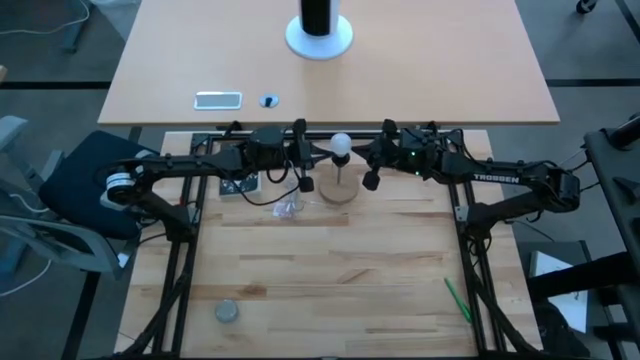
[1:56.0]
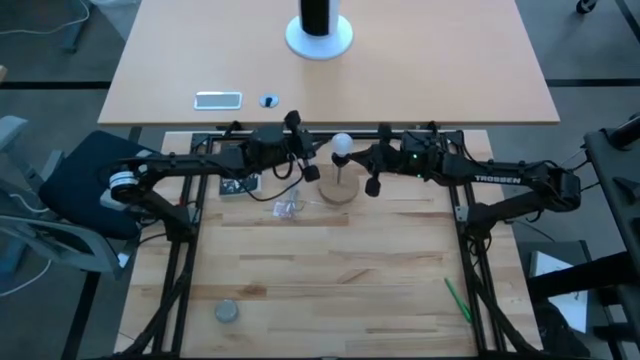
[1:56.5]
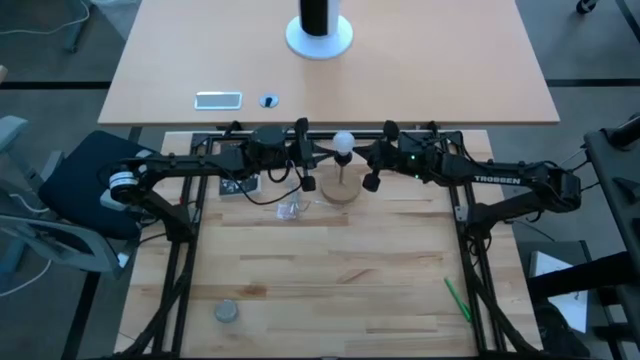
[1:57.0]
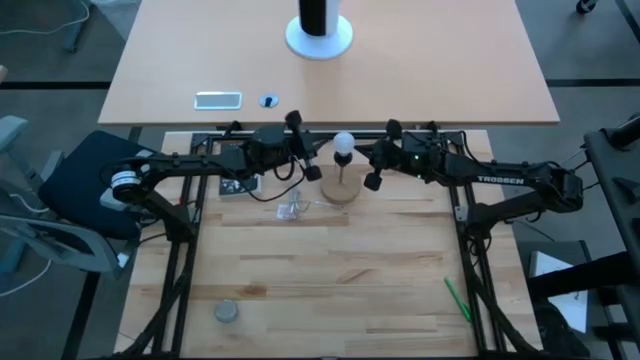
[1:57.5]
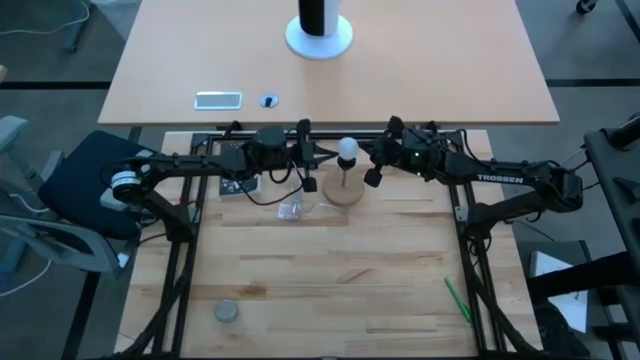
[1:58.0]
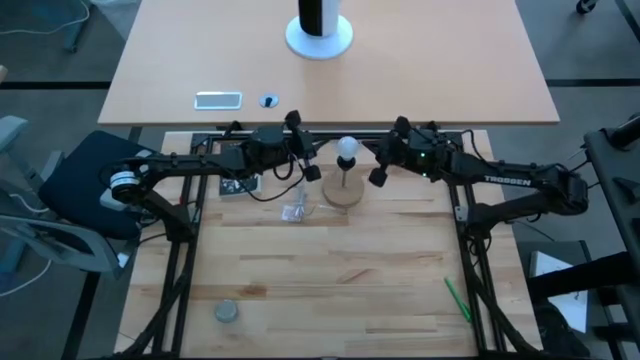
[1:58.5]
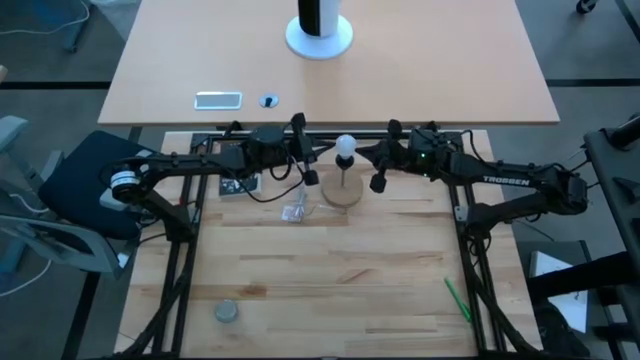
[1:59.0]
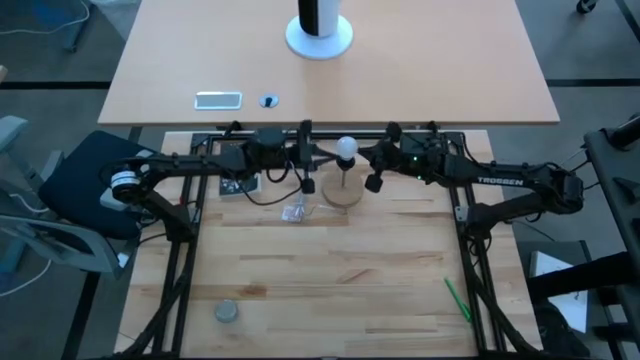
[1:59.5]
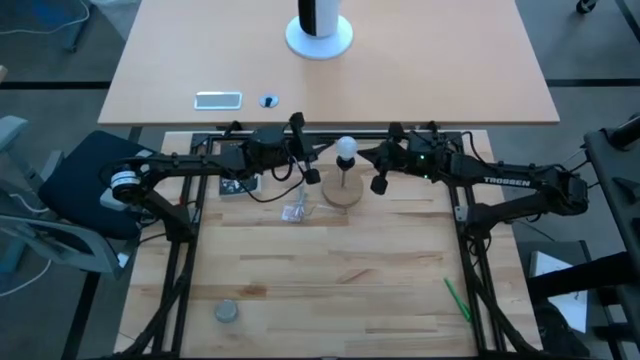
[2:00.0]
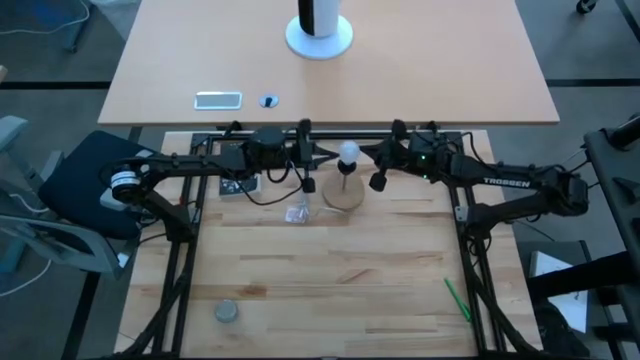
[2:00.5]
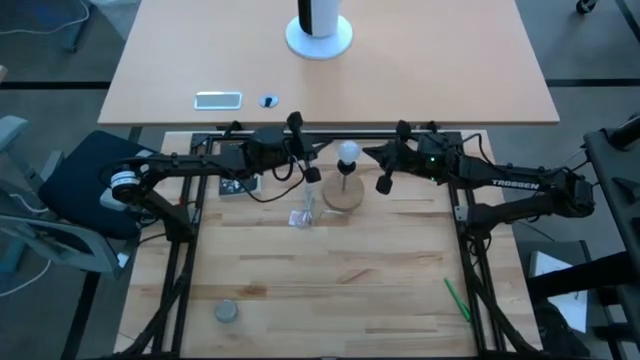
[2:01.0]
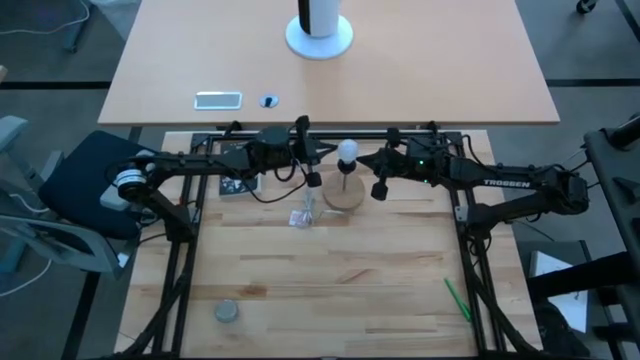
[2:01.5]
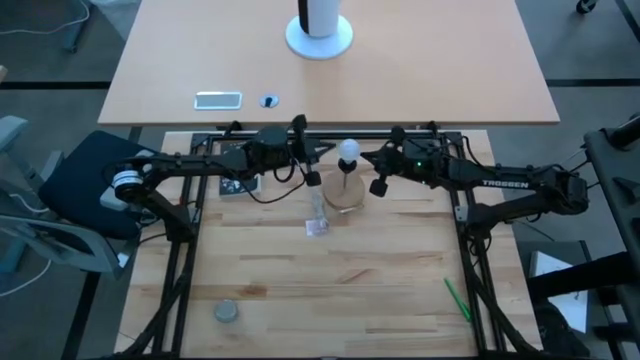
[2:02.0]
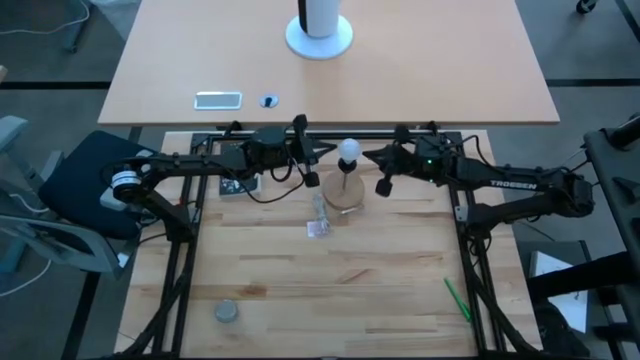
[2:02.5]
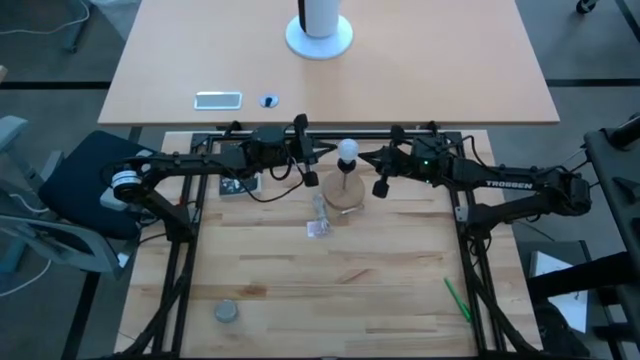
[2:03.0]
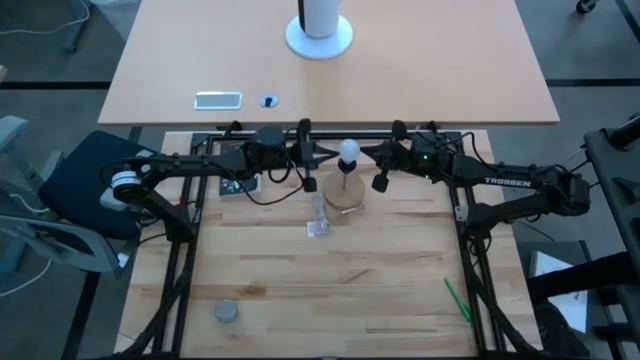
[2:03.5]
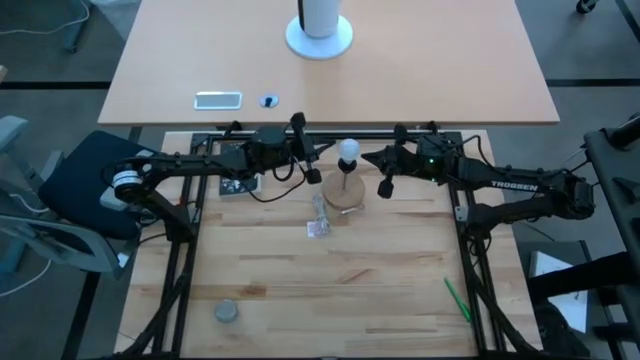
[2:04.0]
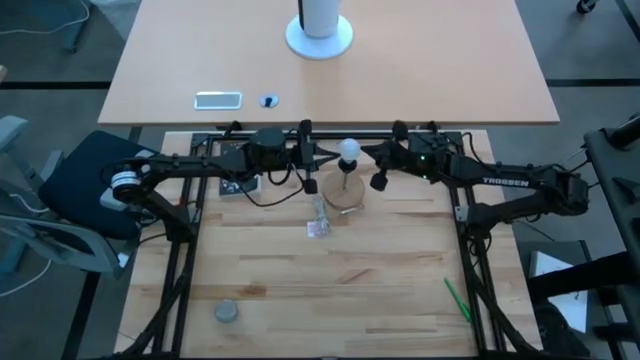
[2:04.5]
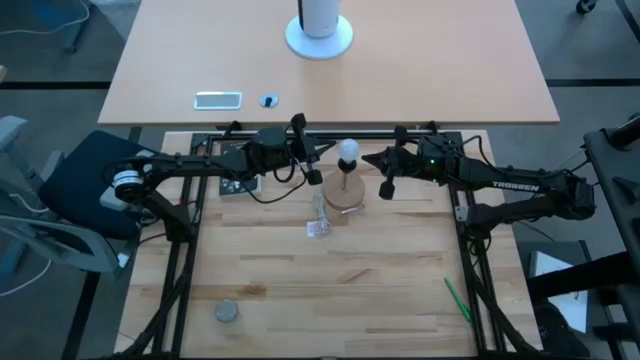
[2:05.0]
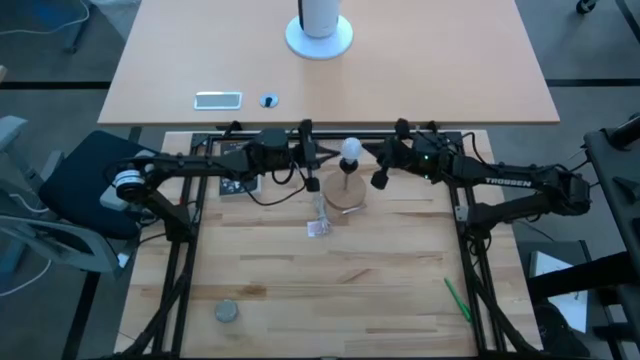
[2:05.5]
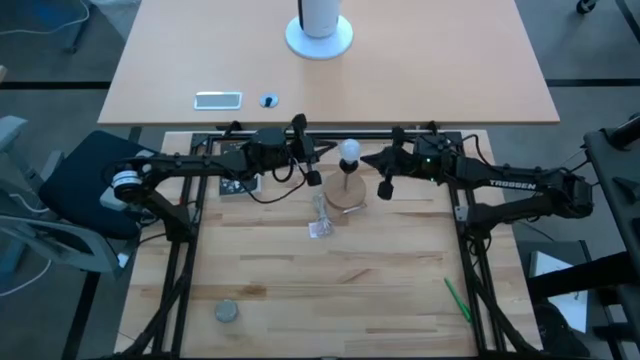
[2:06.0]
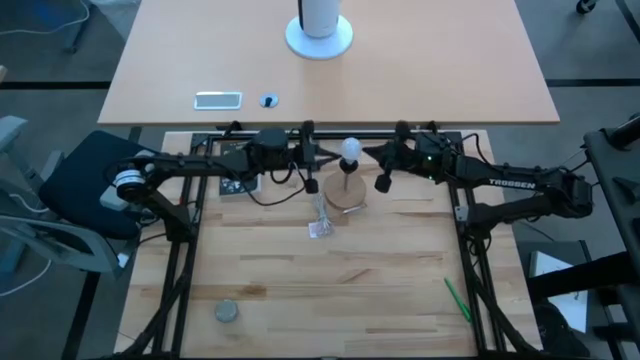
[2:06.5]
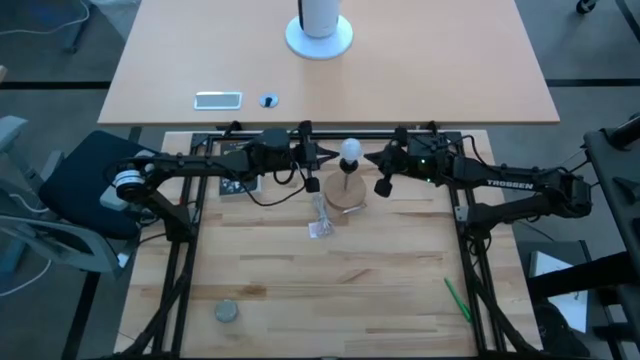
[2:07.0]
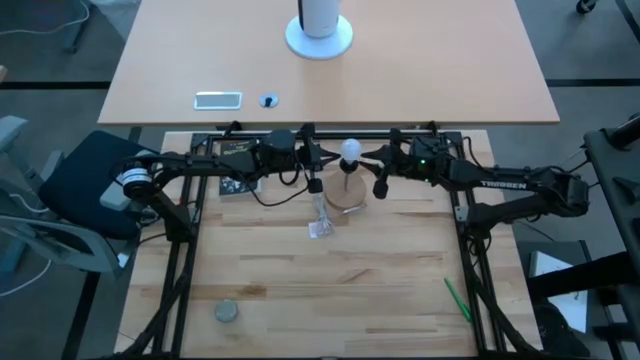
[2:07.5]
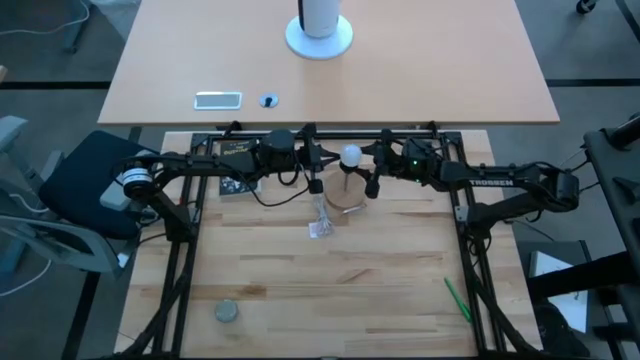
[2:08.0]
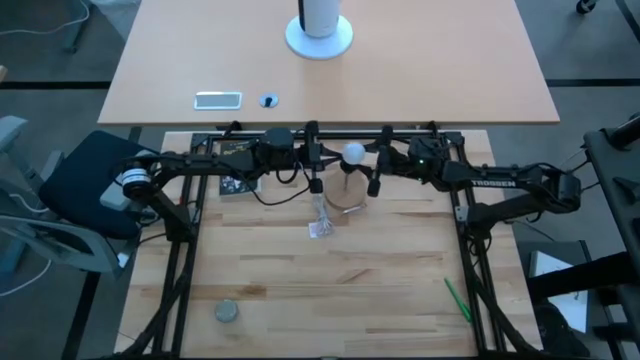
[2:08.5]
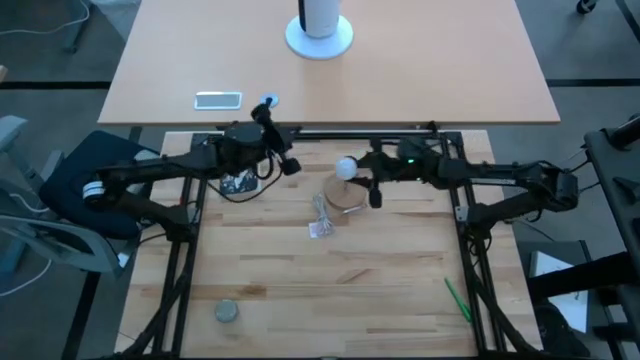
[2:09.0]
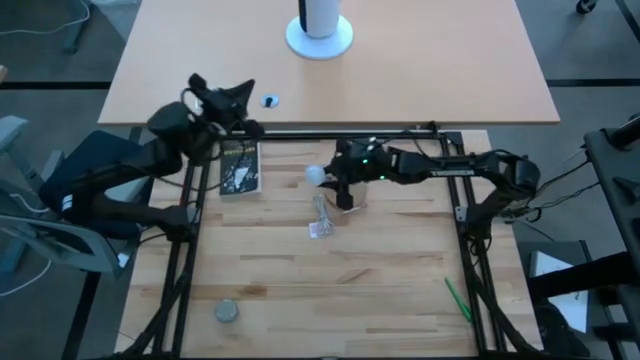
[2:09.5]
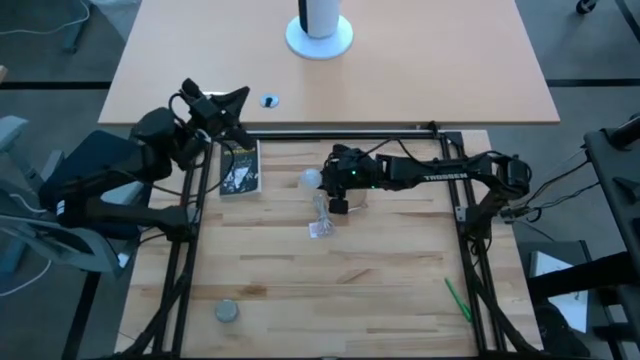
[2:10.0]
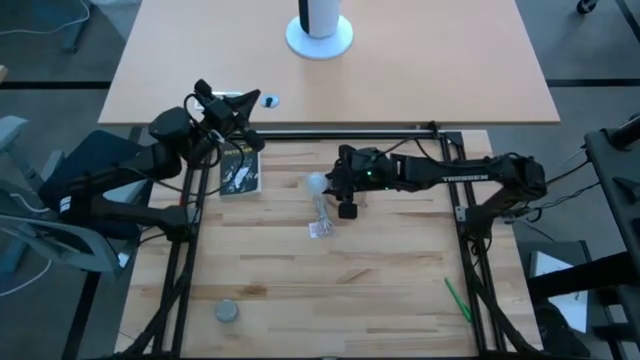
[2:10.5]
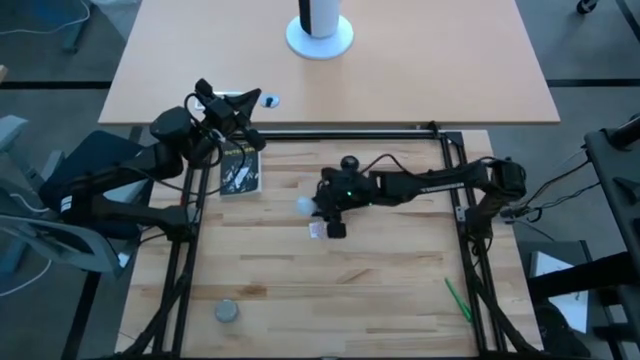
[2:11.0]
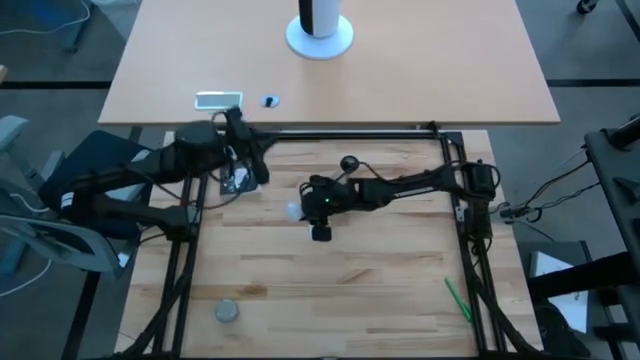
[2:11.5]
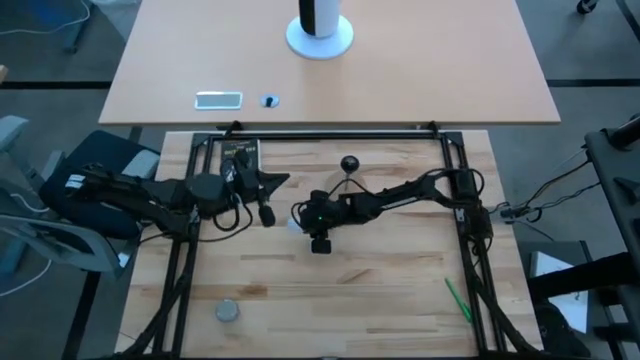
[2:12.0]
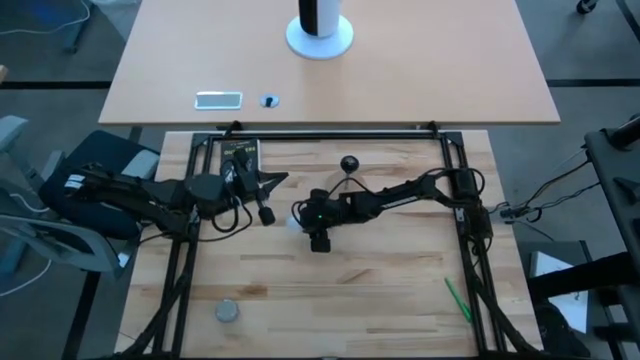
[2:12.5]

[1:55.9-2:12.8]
Task: Screw lightbulb
Remove the lightbulb from the black lamp

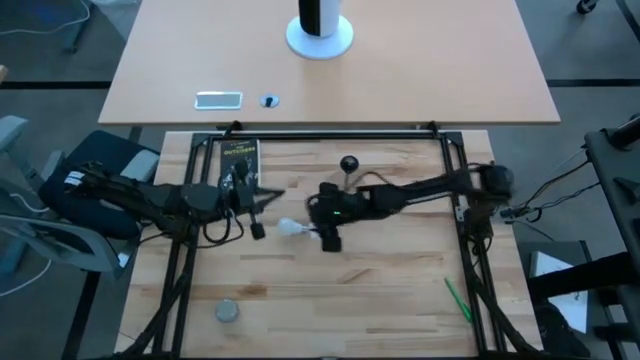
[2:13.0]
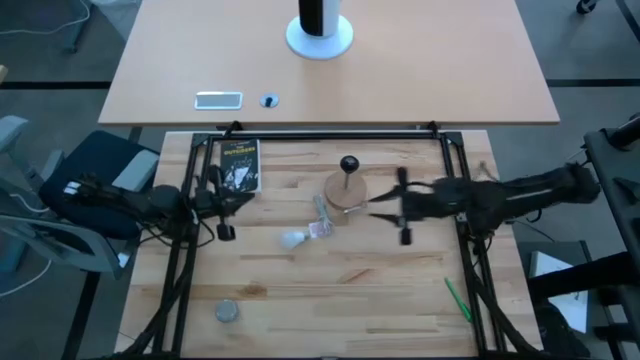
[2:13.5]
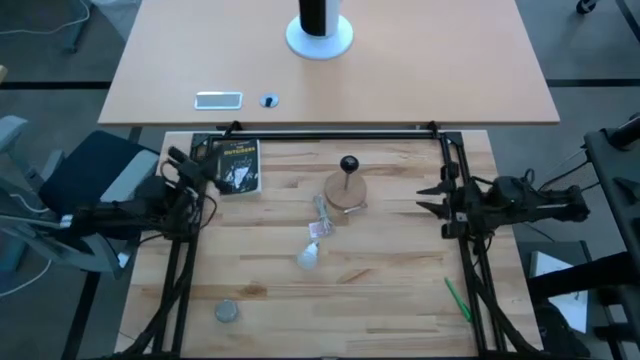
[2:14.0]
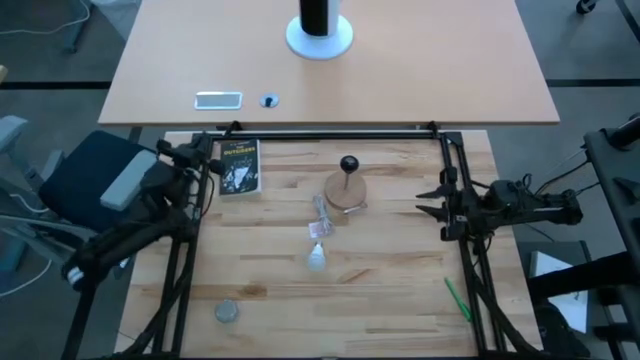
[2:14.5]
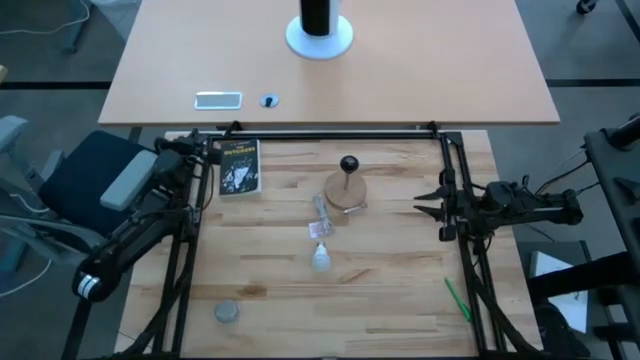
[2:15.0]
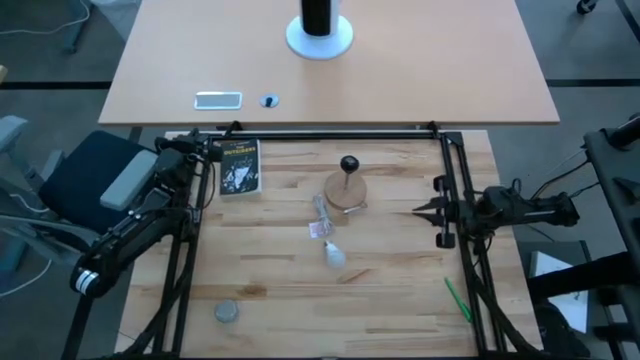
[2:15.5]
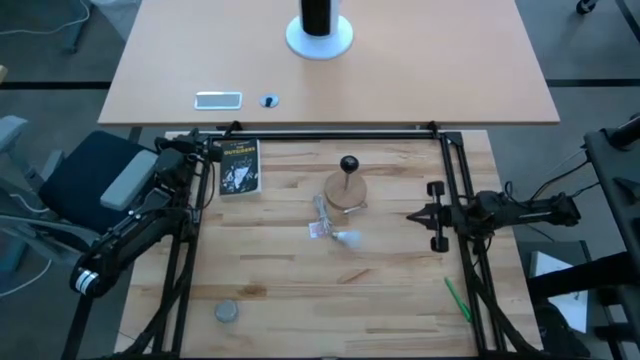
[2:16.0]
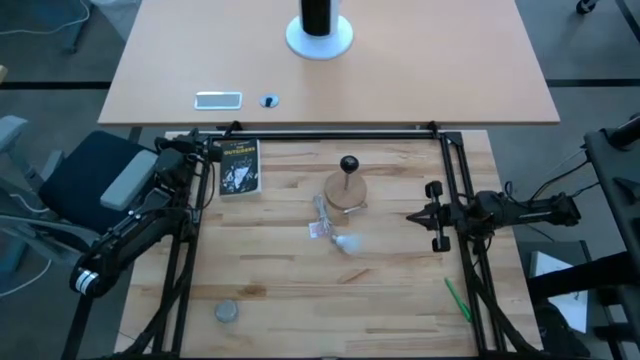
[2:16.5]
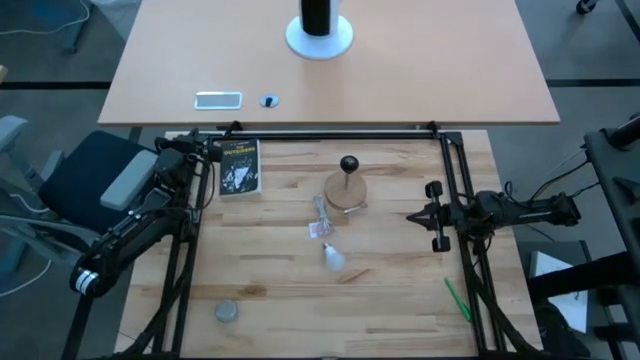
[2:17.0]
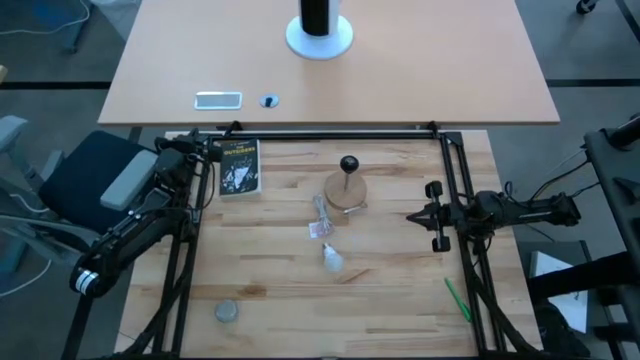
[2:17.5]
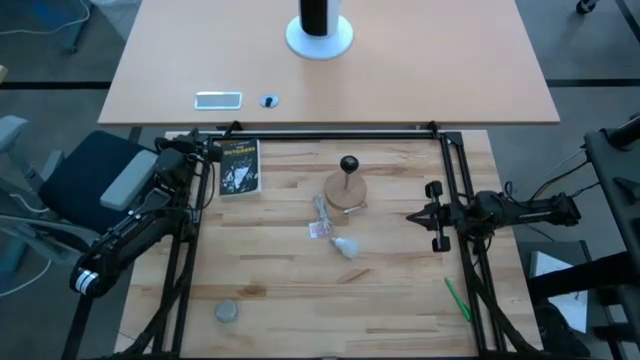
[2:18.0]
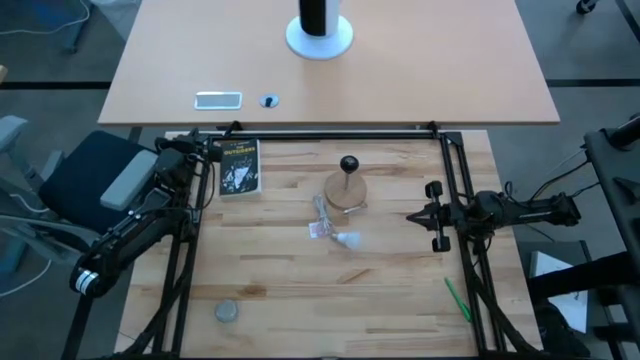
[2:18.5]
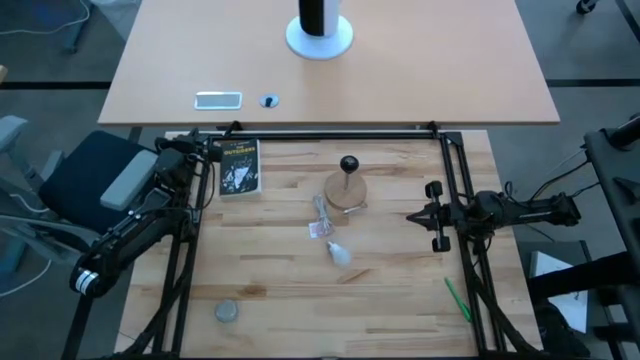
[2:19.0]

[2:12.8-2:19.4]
Return to Home Position
